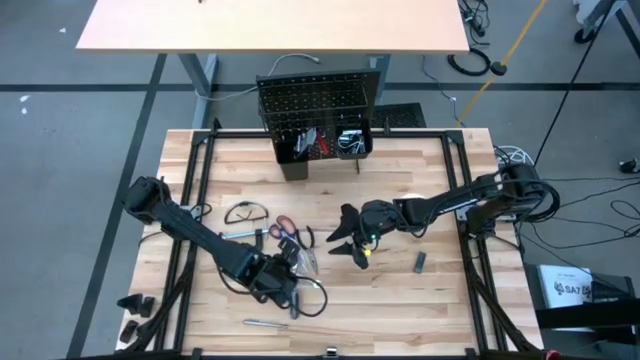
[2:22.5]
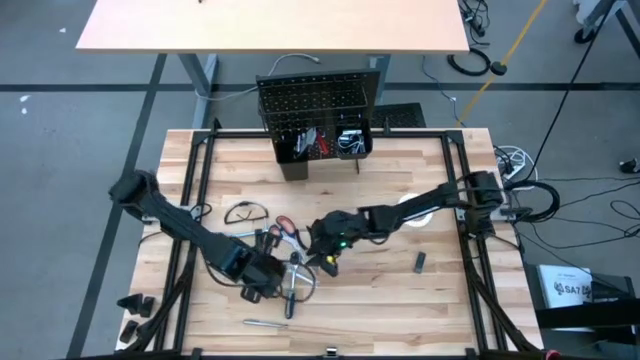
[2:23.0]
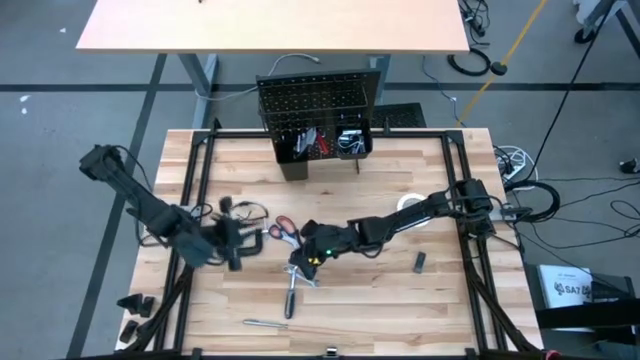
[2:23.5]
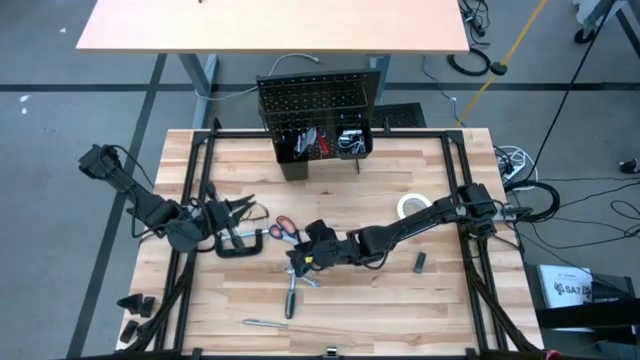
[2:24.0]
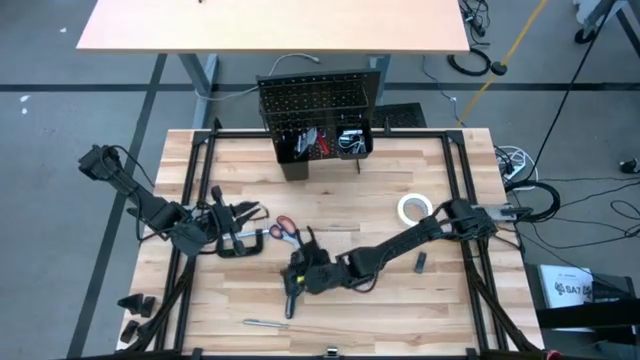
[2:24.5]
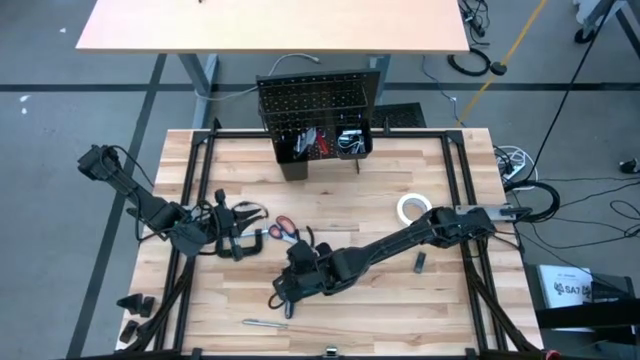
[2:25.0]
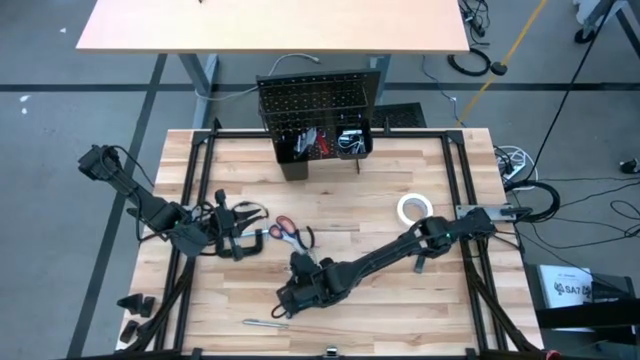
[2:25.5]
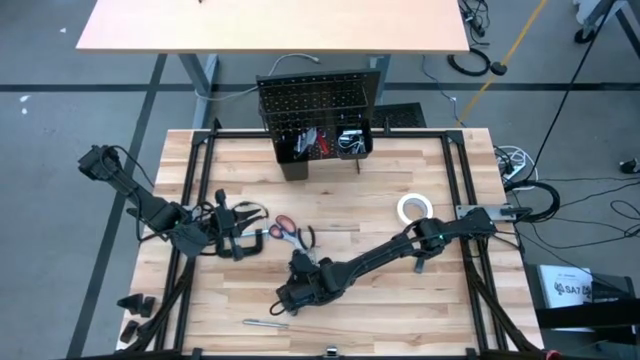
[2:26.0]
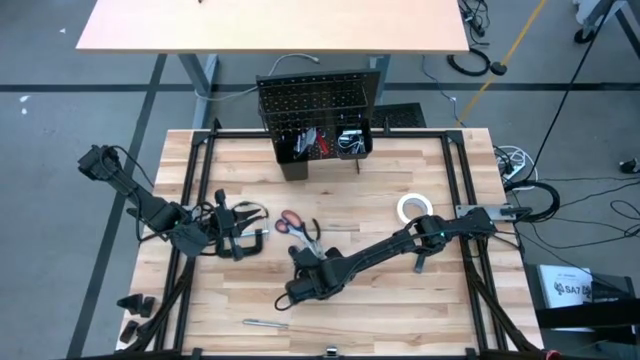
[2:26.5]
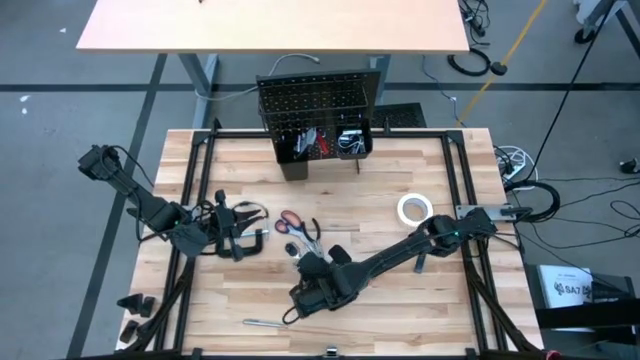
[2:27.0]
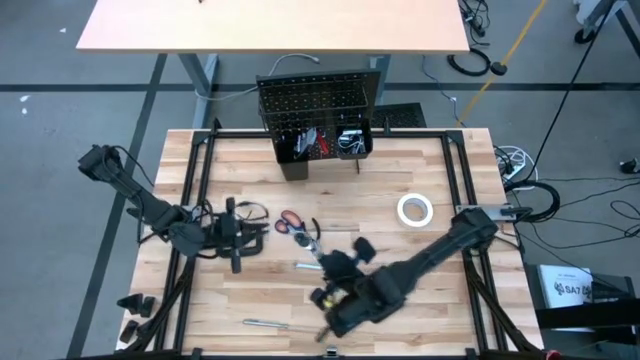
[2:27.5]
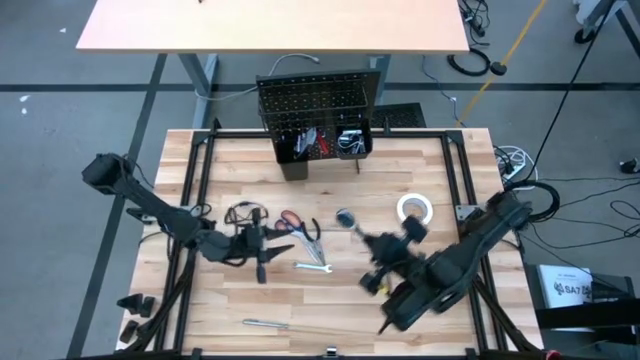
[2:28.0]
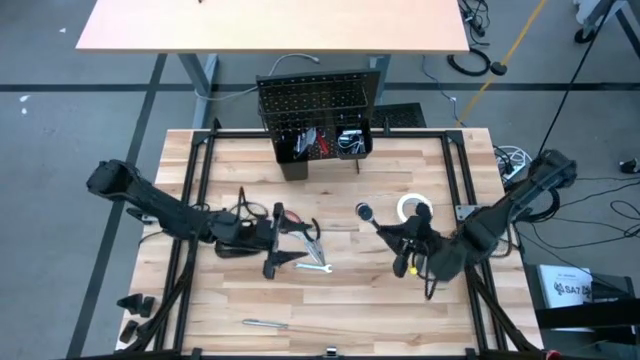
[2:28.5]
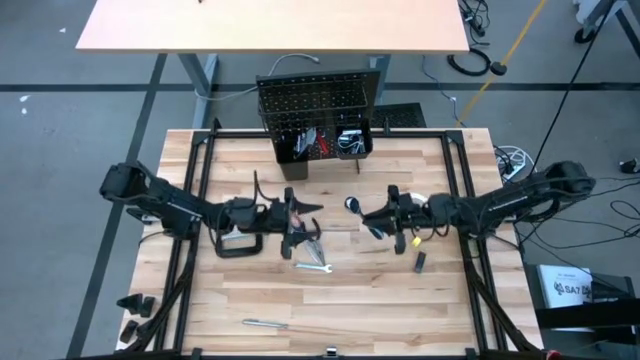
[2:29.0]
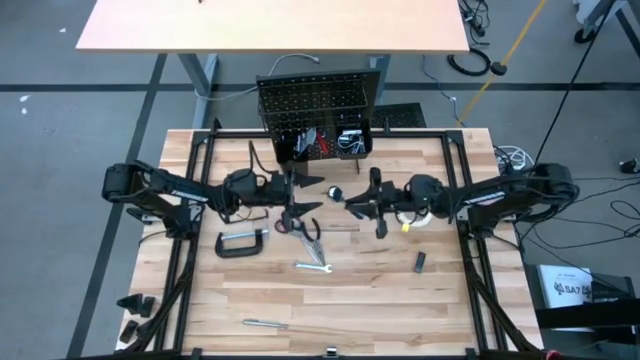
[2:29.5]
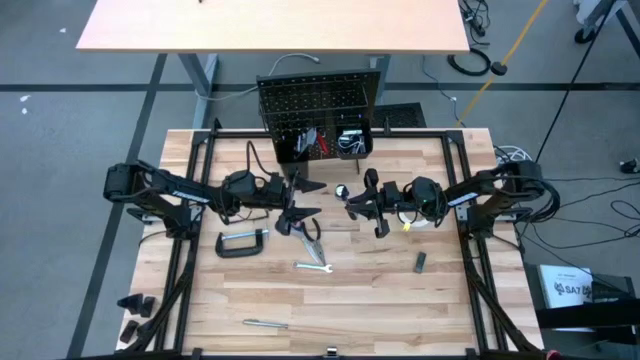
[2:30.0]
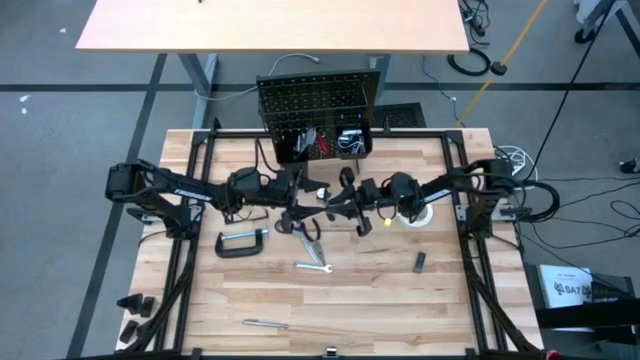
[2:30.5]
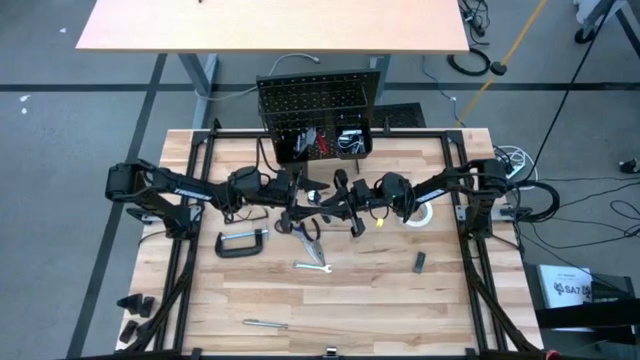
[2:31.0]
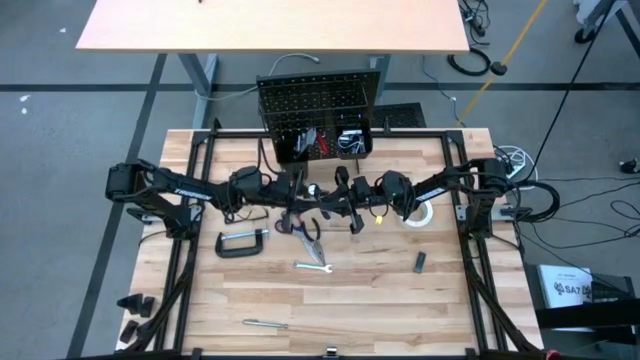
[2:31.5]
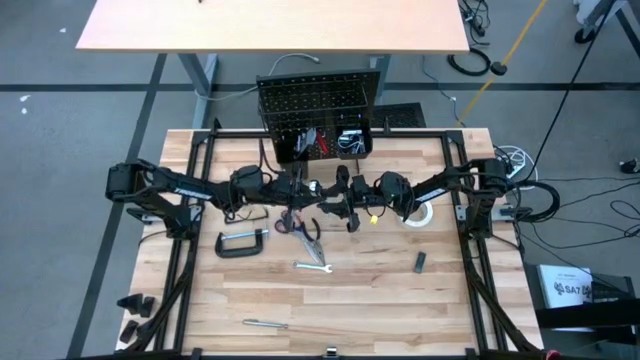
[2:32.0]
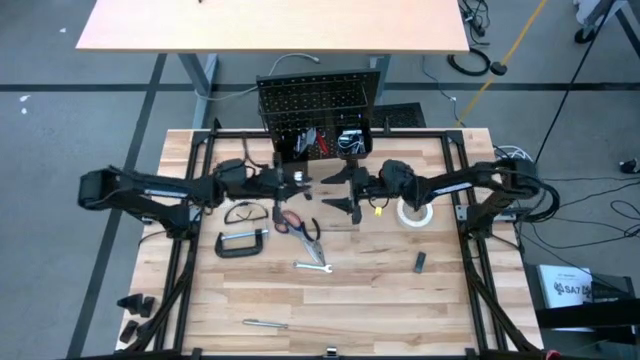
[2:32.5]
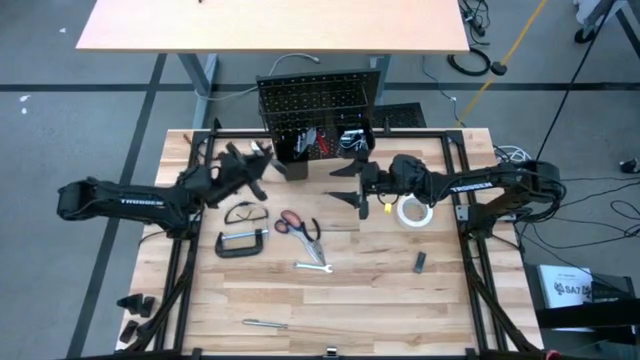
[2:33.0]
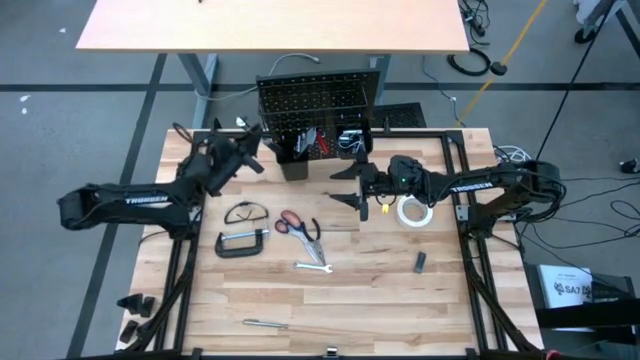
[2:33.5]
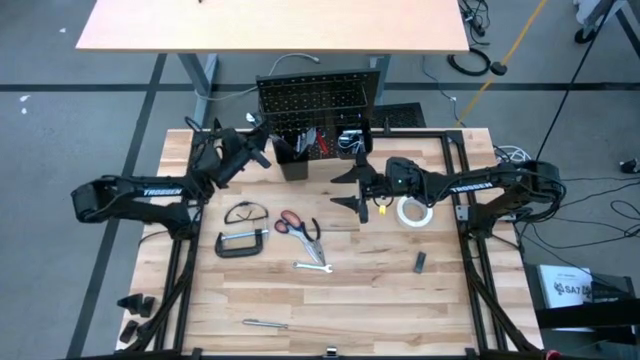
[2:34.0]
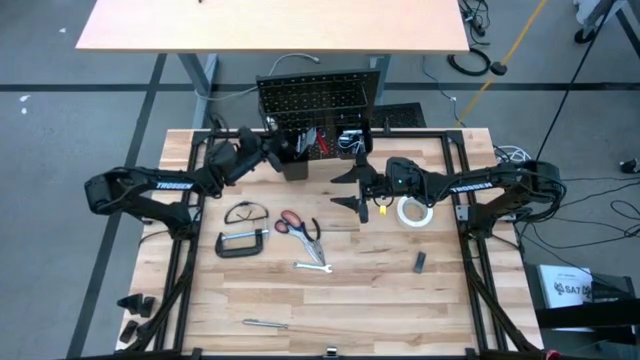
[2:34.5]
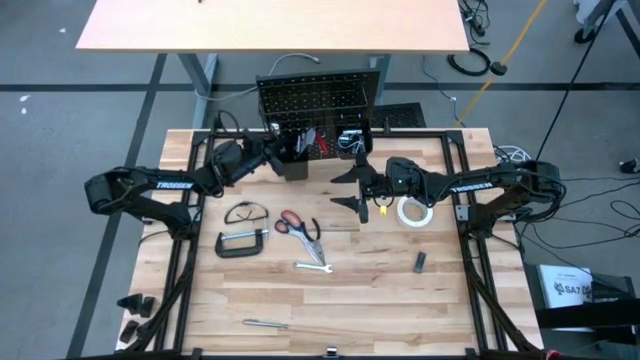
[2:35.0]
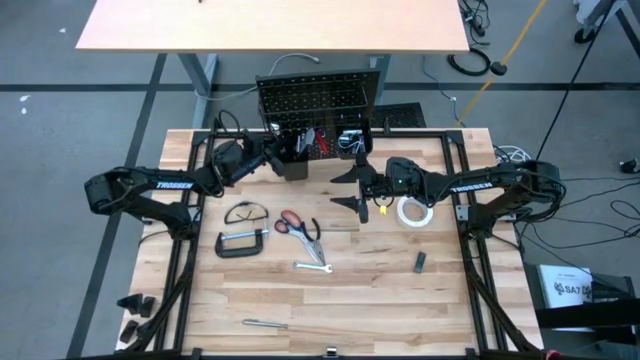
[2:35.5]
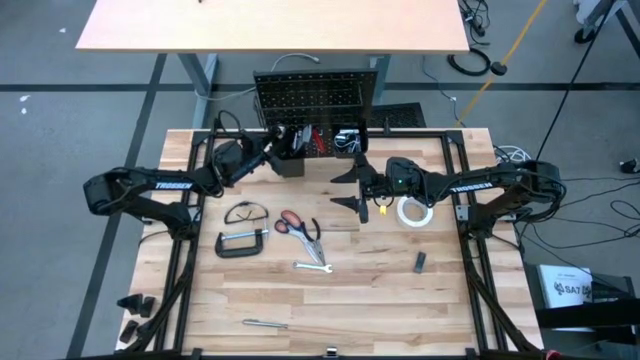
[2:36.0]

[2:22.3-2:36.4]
Task: Hang tools onto peg board
Put the ratchet wrench on the left black bin on the peg board

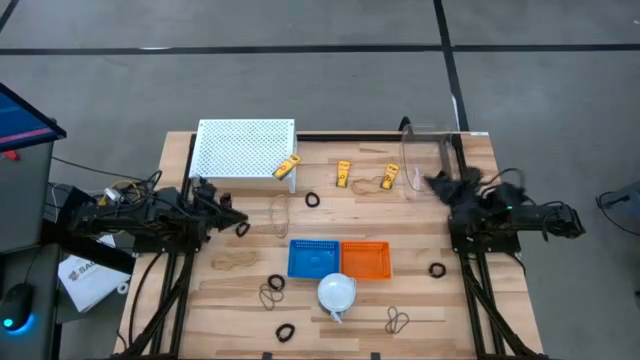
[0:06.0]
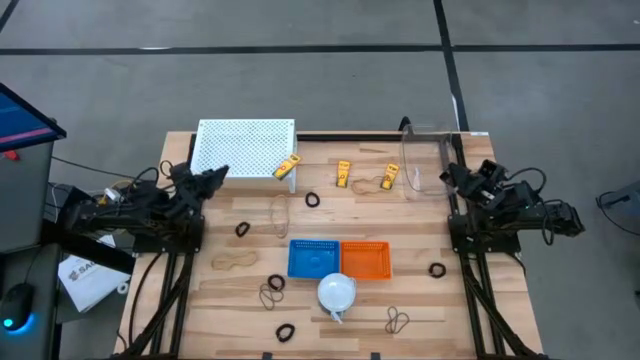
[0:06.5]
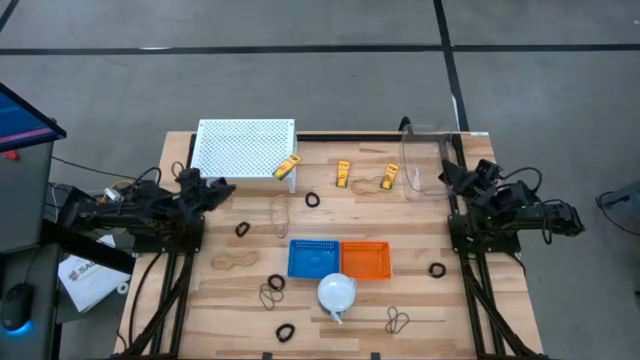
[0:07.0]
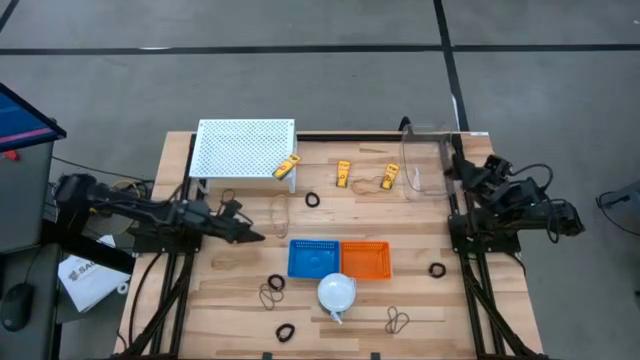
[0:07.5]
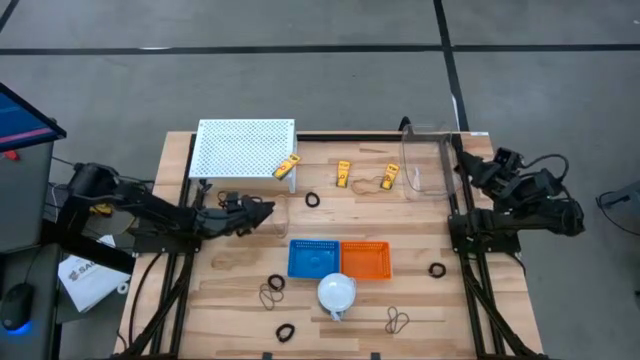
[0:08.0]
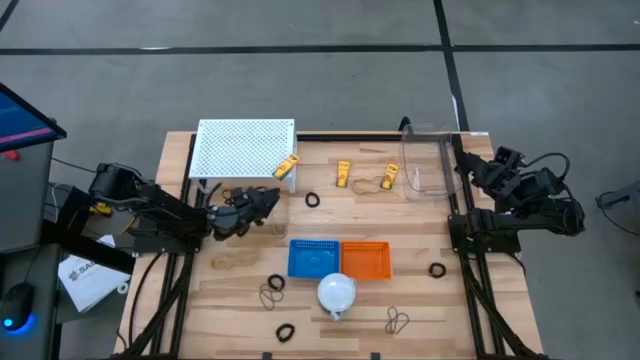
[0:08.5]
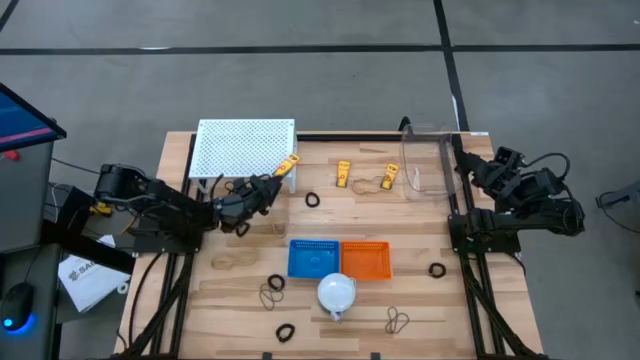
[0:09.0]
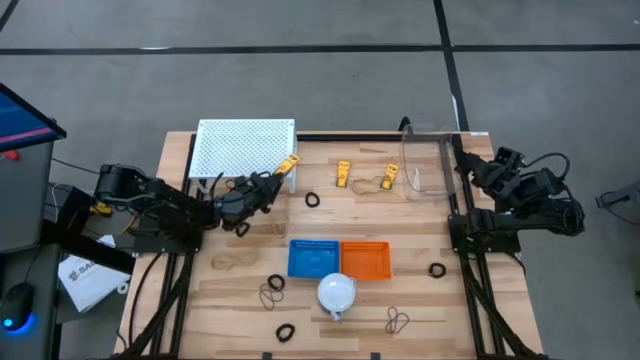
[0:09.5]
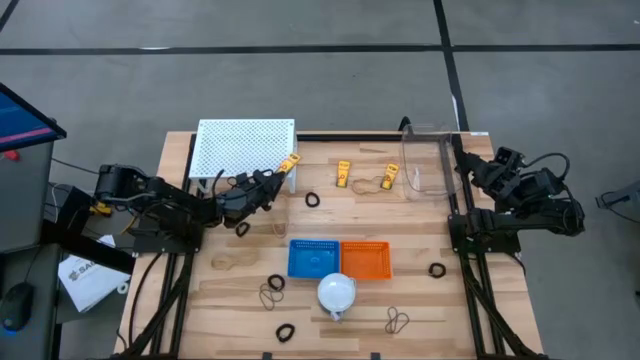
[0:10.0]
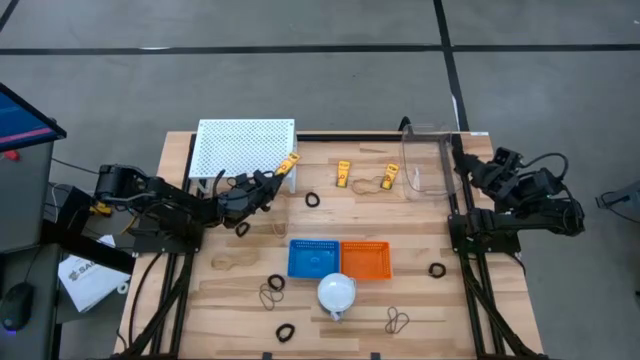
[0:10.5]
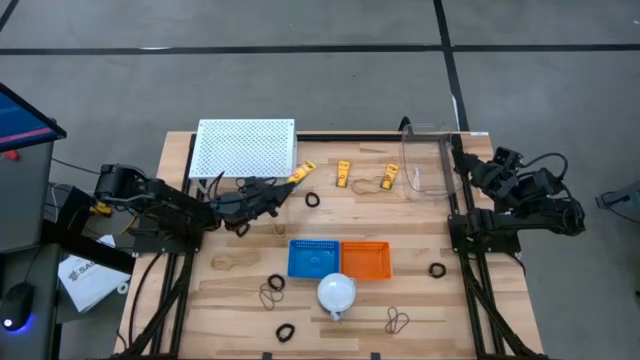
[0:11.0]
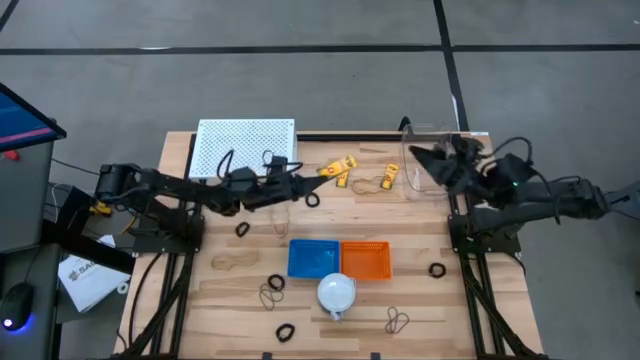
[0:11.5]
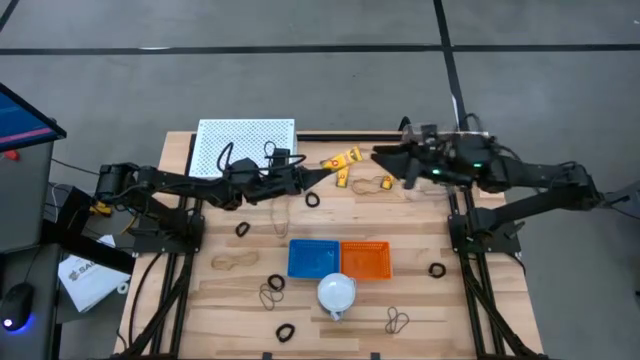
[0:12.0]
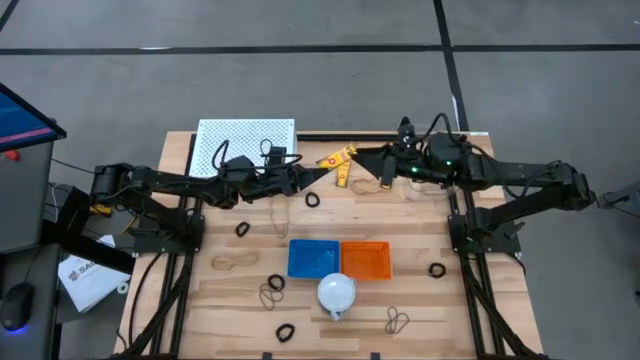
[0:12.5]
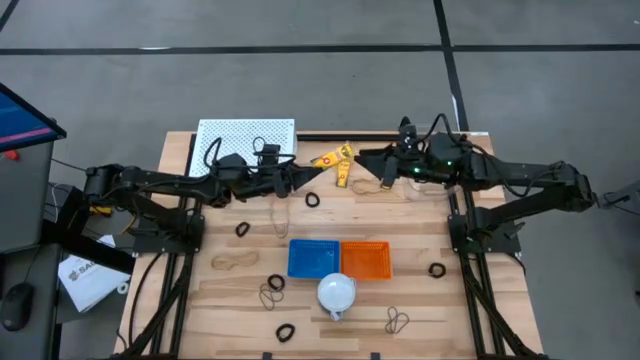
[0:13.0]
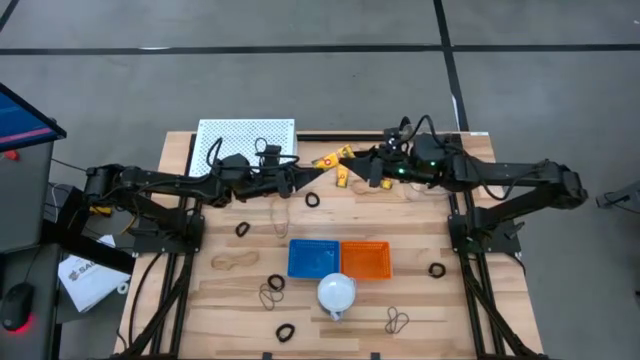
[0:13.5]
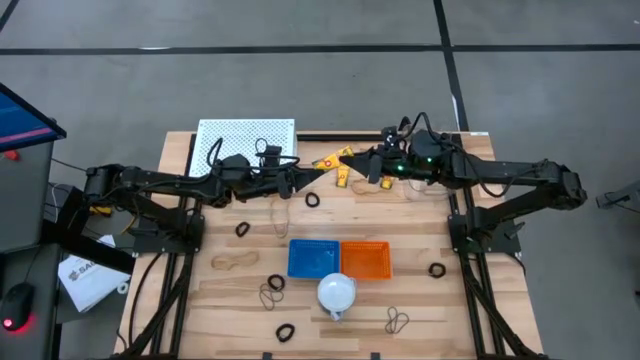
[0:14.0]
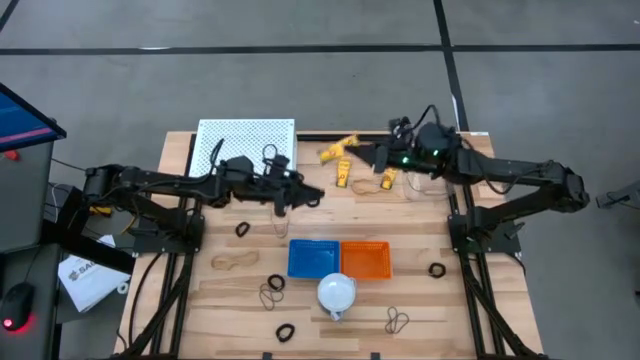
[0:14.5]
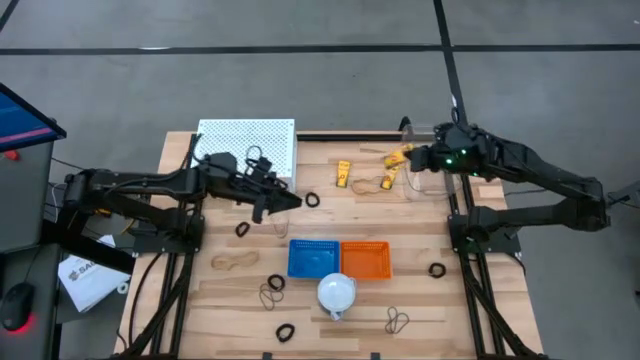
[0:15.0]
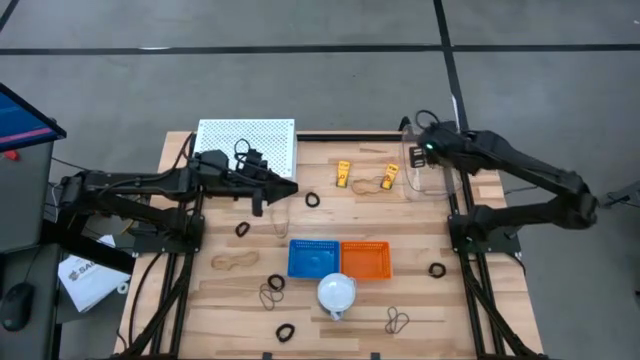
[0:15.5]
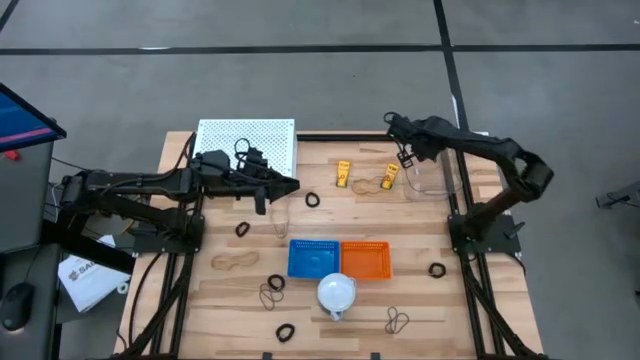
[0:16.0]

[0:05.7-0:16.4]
Task: Pick & Place Office Desk Supplies
Put the yellow crayon box from the shelf into the transparent bin
